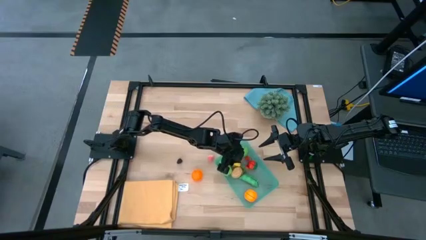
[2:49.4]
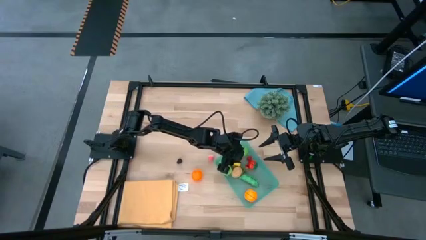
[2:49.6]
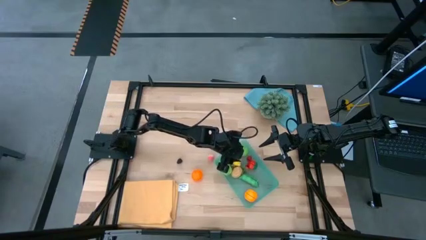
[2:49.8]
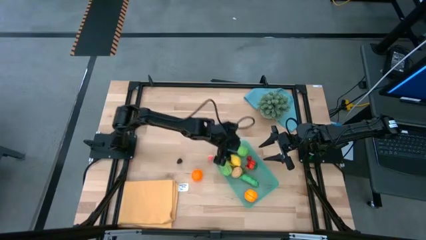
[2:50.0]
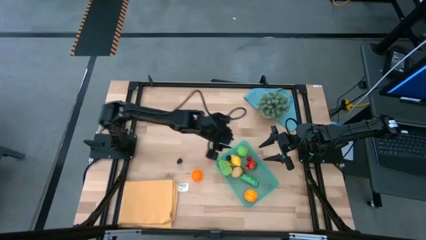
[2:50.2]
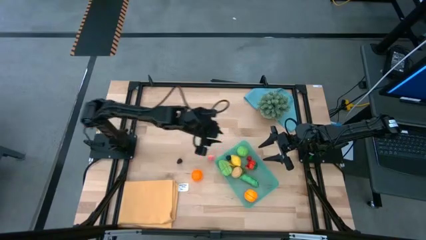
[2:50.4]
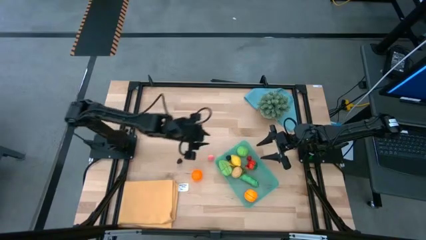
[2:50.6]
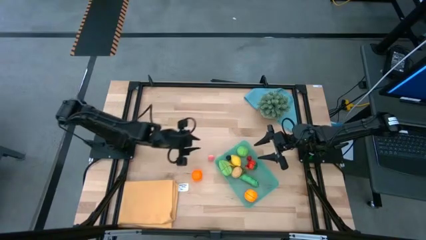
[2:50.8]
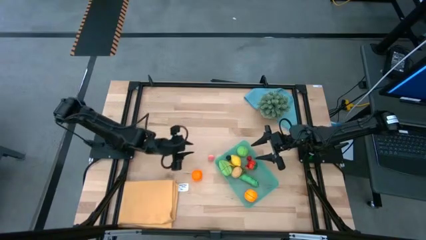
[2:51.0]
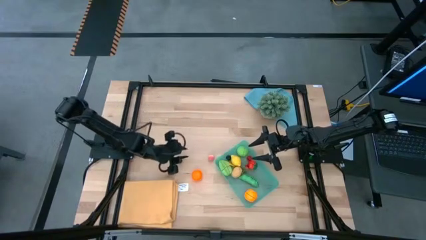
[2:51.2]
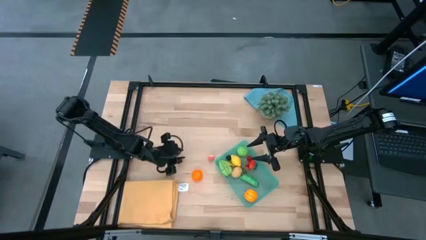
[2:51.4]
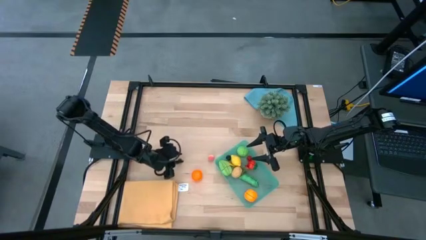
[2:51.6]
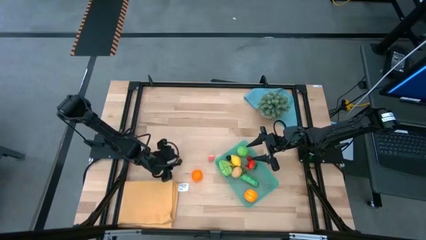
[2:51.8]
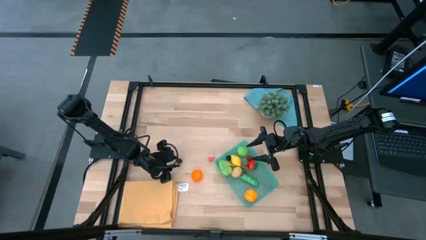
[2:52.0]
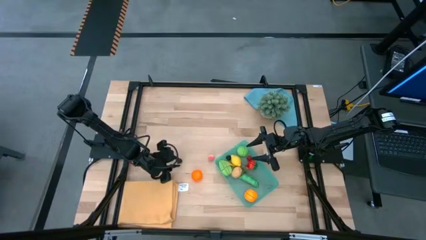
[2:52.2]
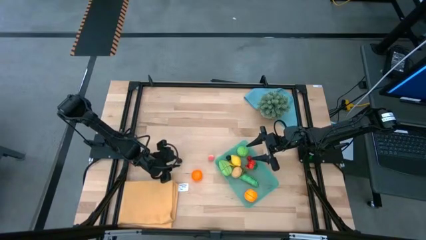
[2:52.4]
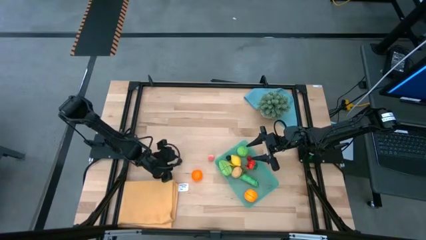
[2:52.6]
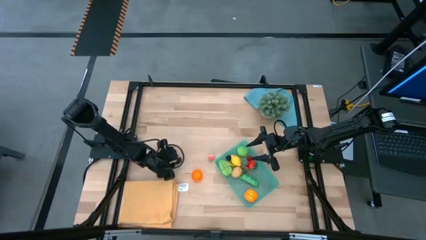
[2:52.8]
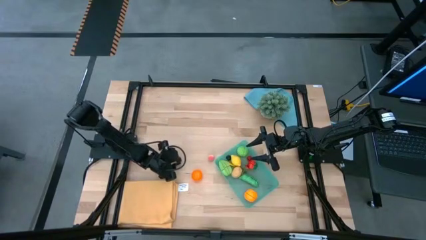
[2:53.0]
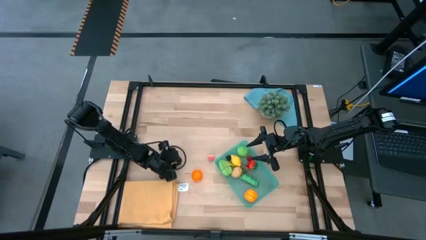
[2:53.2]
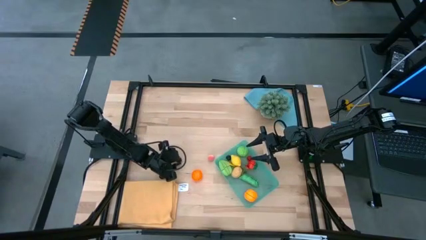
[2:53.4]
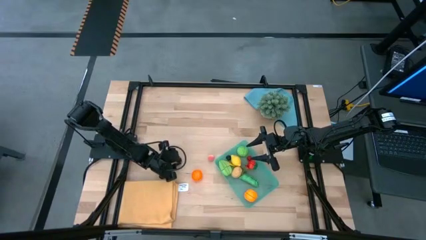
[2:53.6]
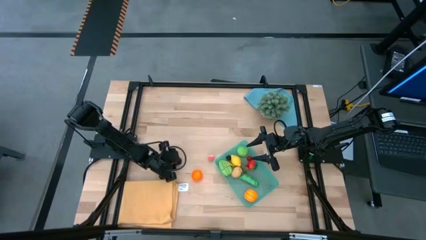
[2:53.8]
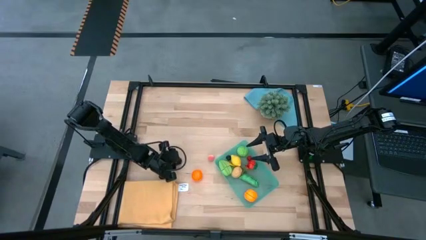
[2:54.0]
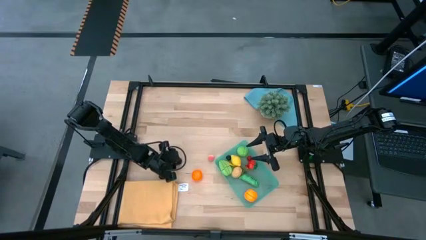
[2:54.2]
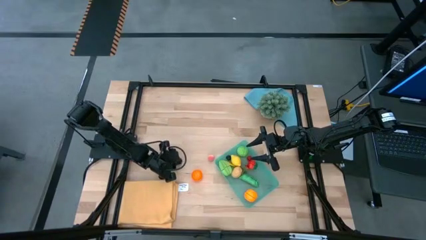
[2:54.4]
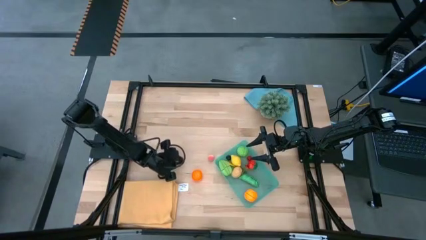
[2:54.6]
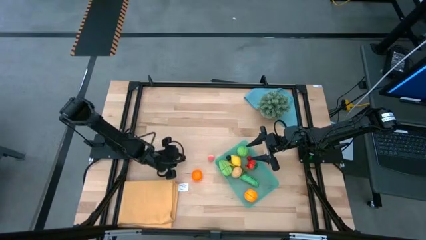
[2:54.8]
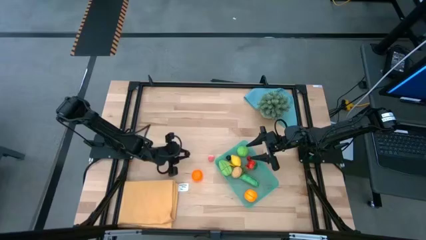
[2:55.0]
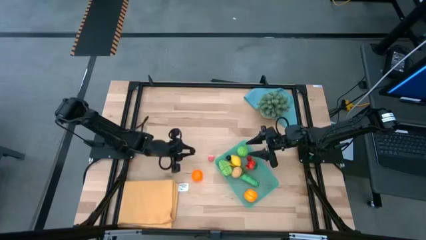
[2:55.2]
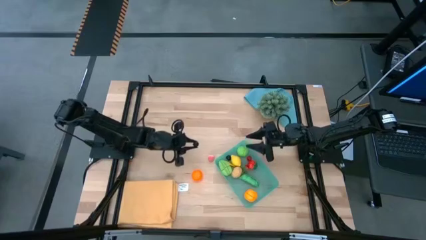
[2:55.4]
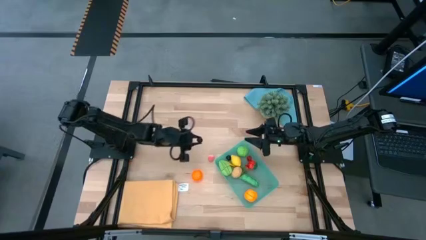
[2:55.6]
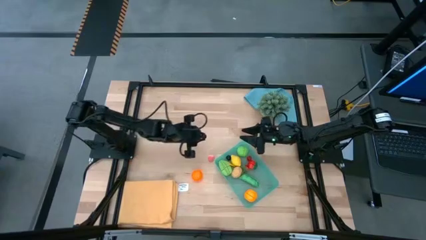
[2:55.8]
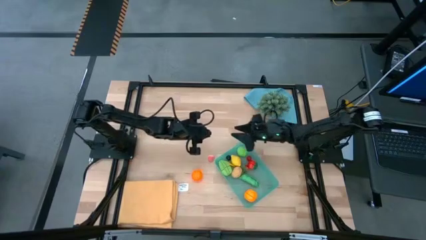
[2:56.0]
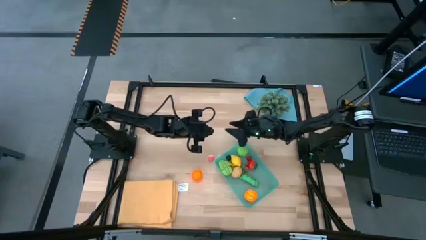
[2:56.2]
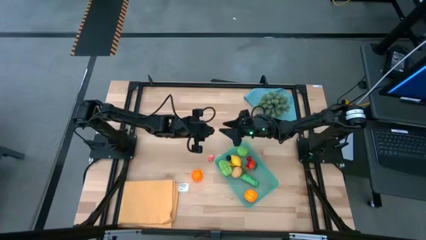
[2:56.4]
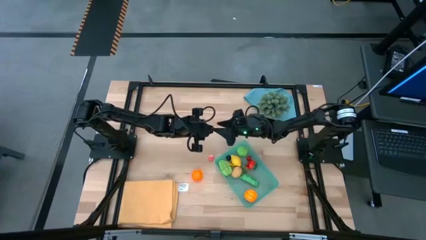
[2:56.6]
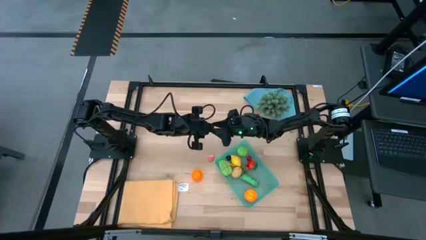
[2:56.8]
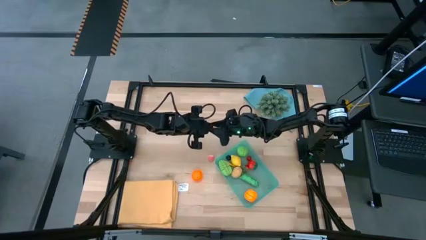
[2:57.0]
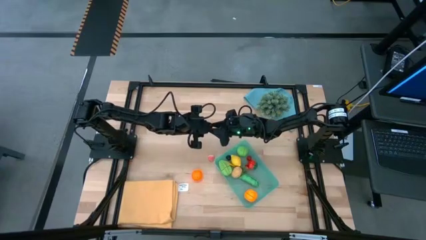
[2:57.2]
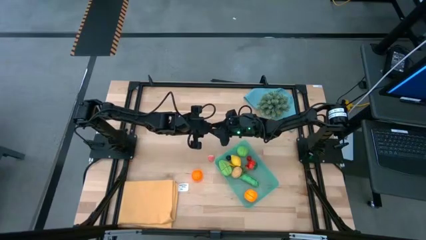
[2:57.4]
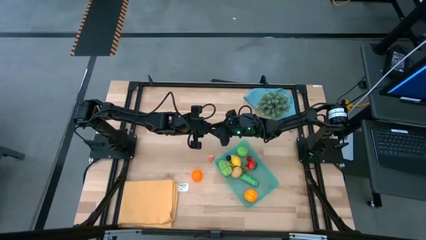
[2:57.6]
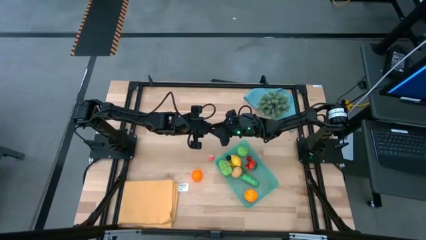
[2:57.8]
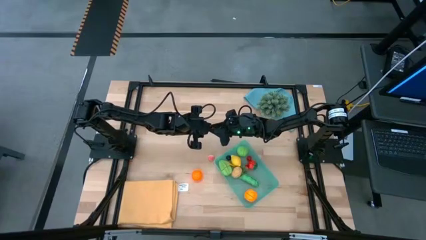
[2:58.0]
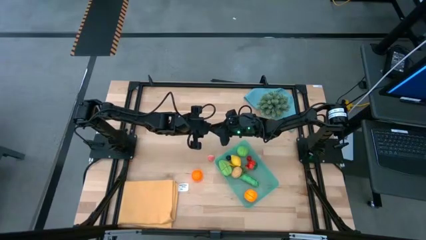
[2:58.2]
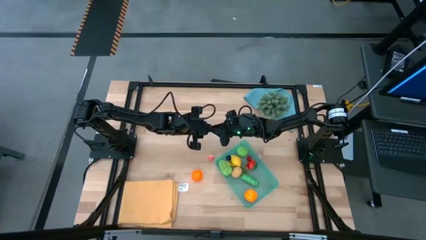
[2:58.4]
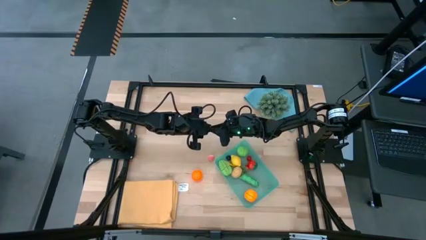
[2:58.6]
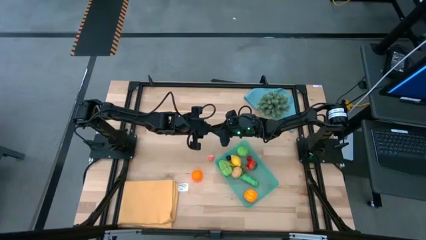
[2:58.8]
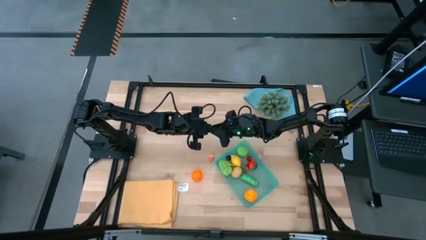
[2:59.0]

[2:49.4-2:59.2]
Task: Pick and placing Produce into tupperware
Put the blackberry into the green bin

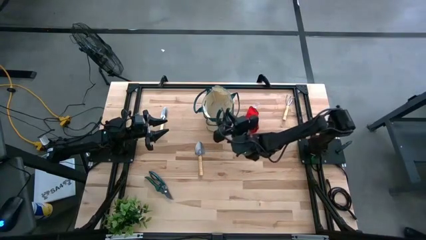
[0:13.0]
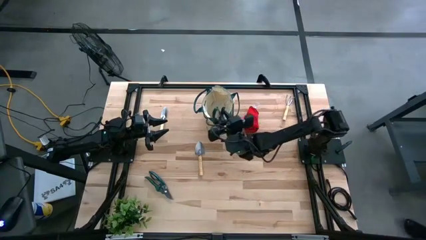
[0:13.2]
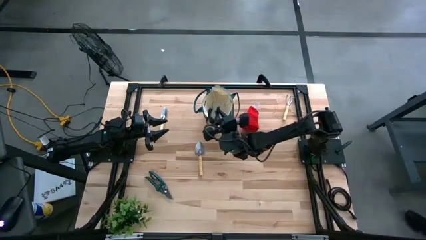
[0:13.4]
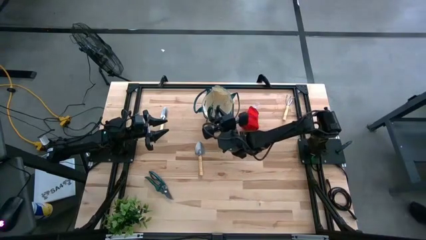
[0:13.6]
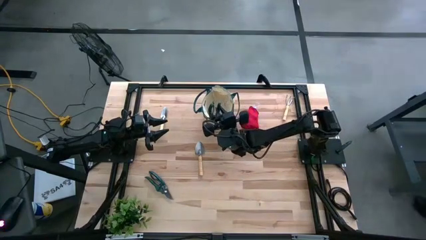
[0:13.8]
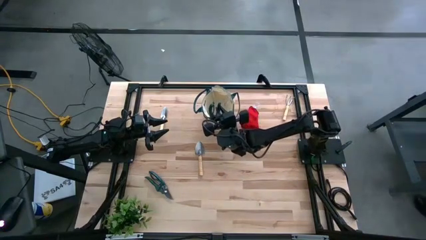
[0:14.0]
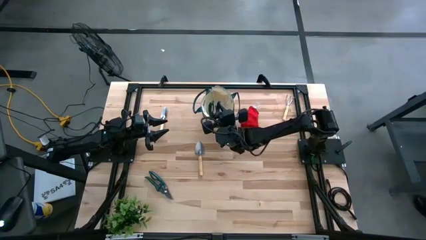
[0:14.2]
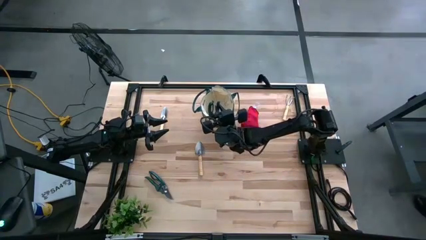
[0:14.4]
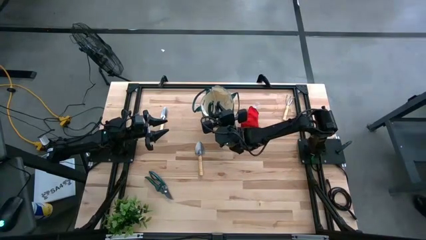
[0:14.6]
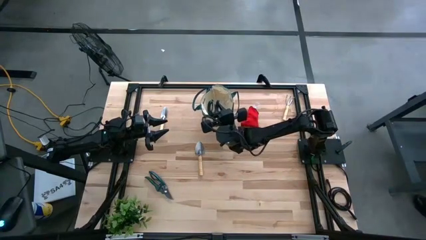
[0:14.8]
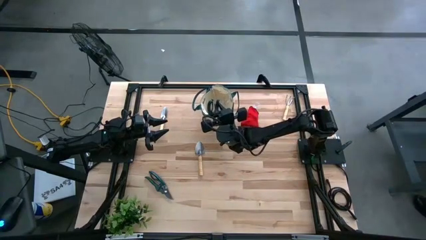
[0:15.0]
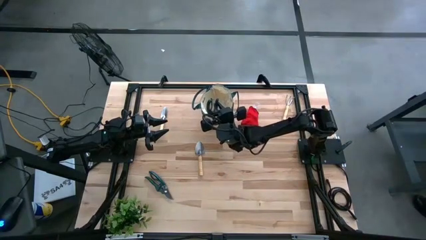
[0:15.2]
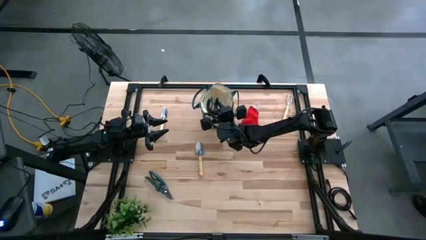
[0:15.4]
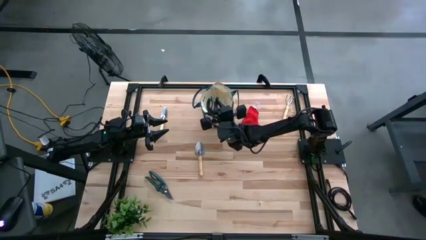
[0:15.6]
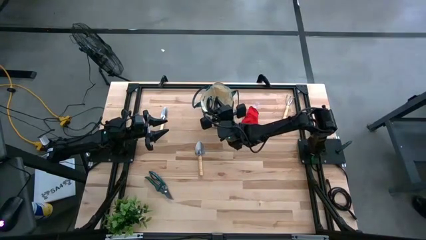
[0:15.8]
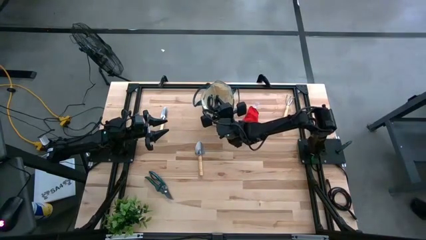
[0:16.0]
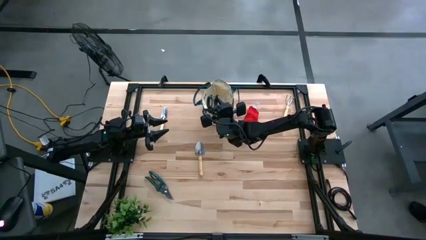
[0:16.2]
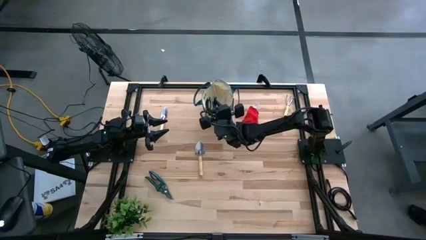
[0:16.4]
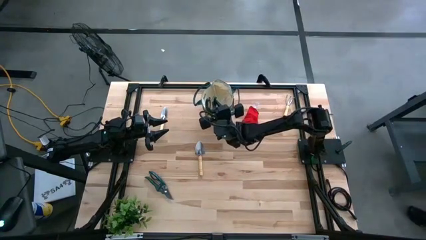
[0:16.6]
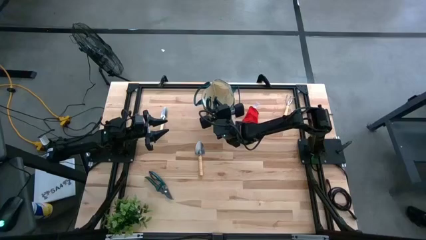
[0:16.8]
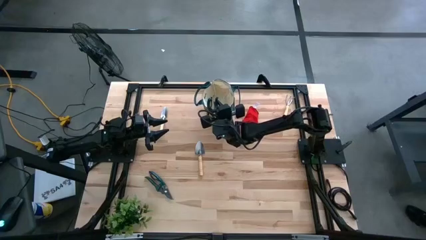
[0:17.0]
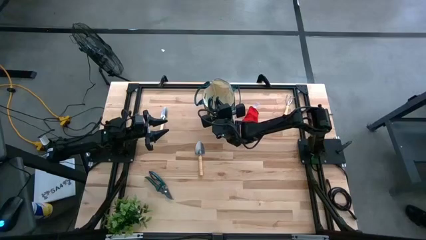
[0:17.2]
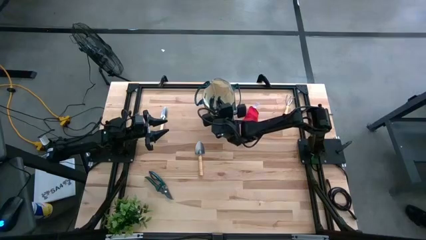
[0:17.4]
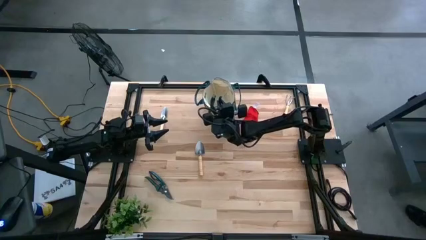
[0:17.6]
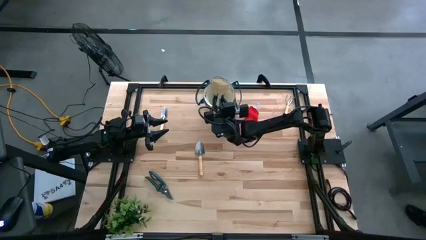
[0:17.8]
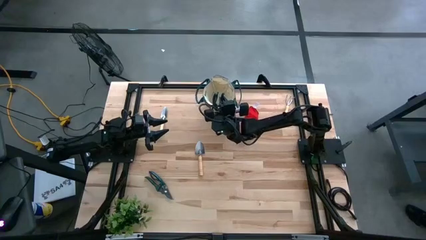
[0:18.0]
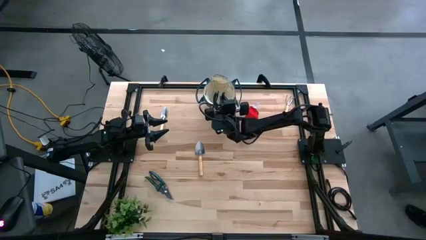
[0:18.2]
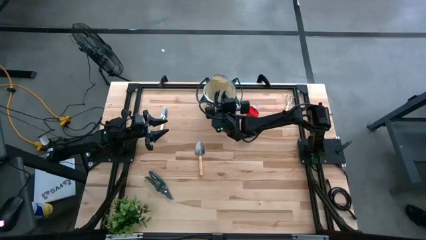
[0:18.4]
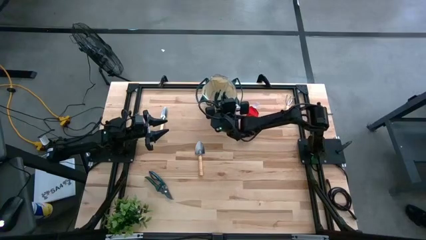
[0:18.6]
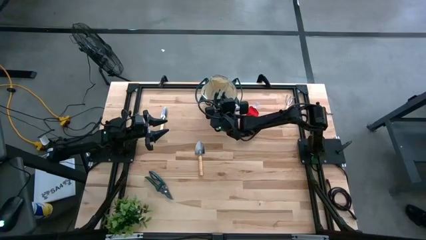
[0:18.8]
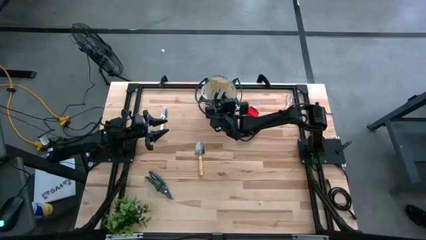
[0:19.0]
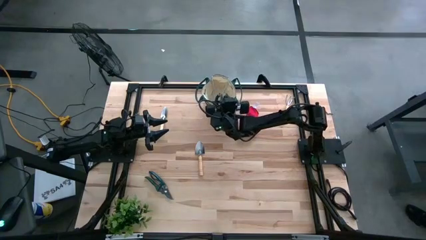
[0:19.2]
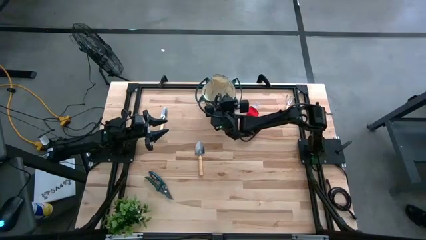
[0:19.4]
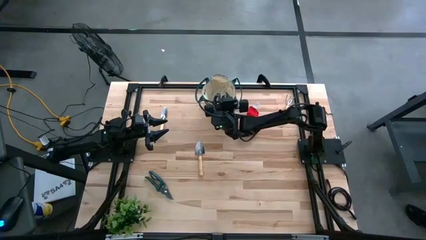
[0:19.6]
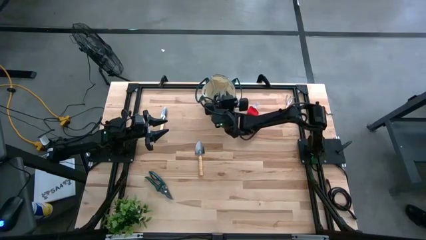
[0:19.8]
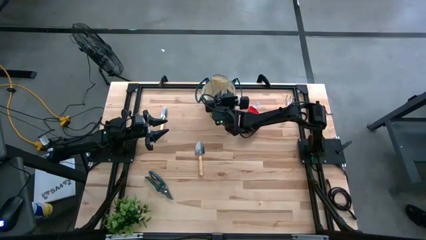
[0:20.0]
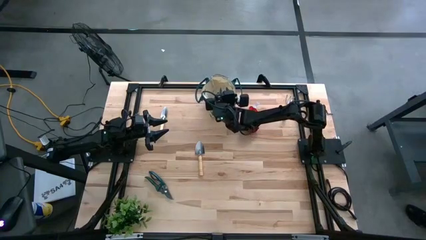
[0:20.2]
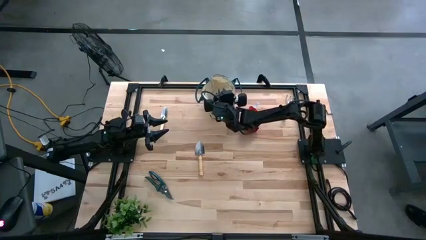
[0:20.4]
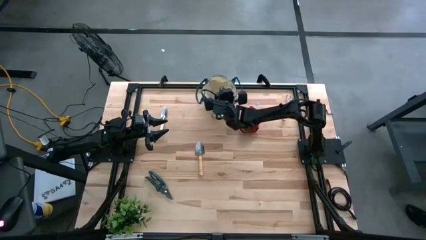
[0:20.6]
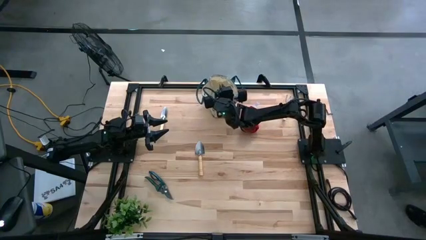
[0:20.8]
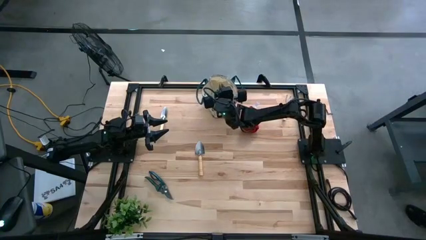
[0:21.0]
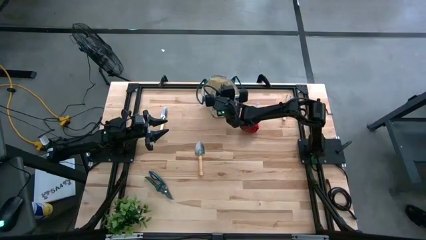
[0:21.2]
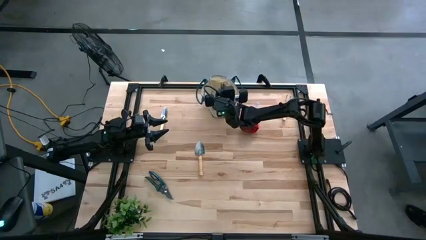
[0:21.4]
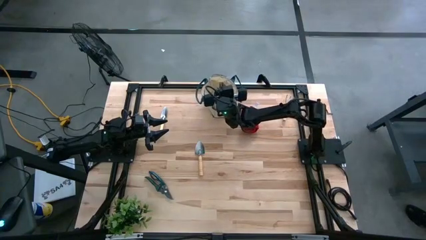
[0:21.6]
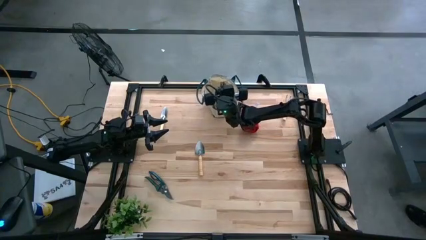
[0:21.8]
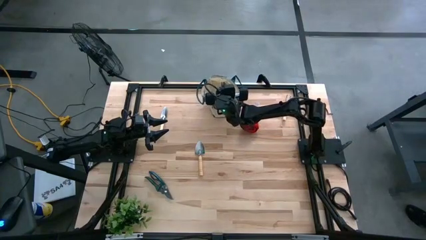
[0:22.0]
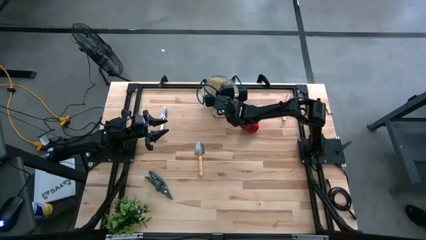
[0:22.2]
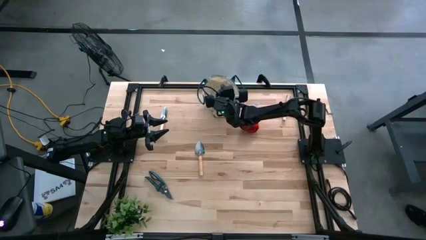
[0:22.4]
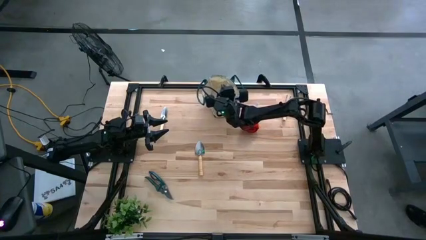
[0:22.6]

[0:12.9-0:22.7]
Task: Pick & Place Garden tools in Gardening bag
Put the green shear scissors into the gardening bag
